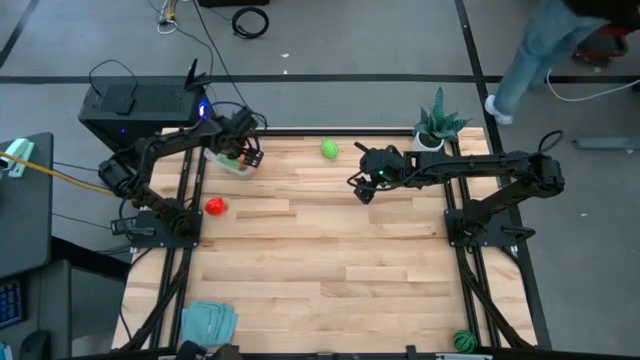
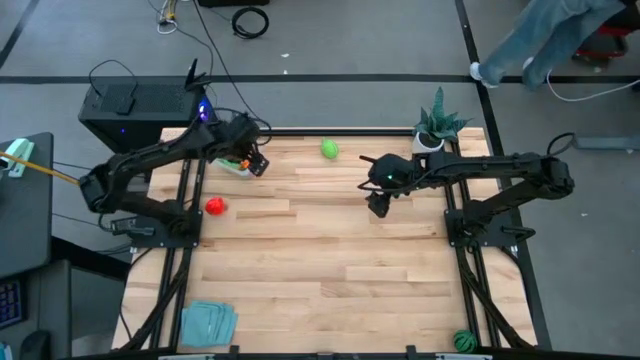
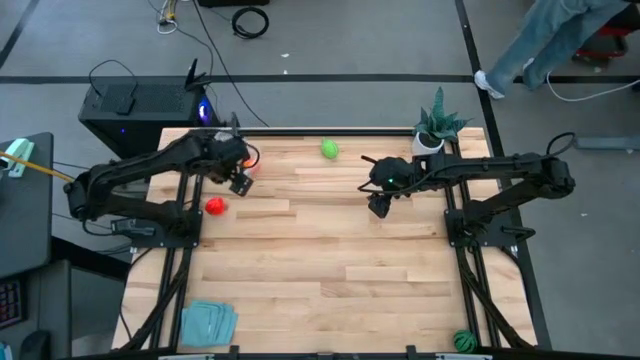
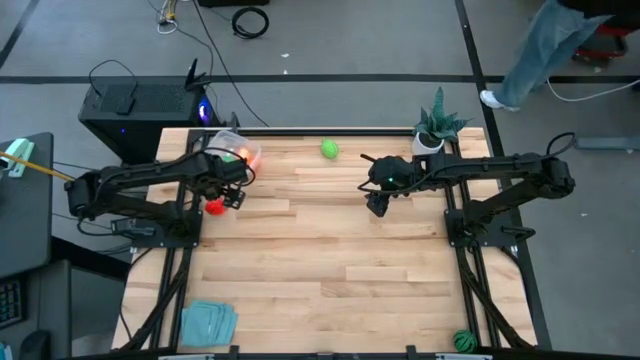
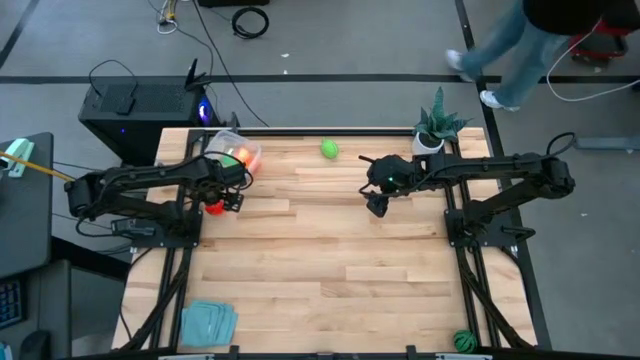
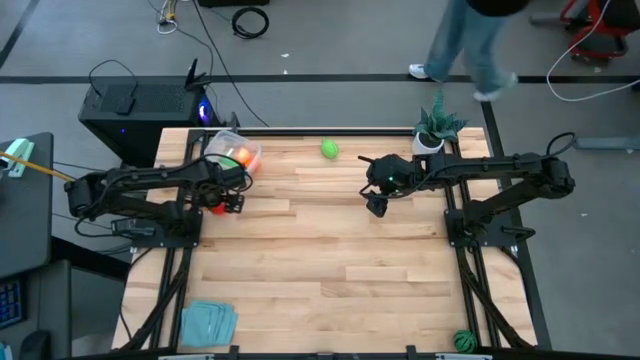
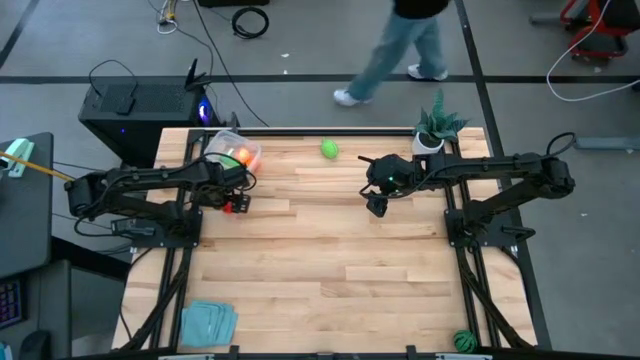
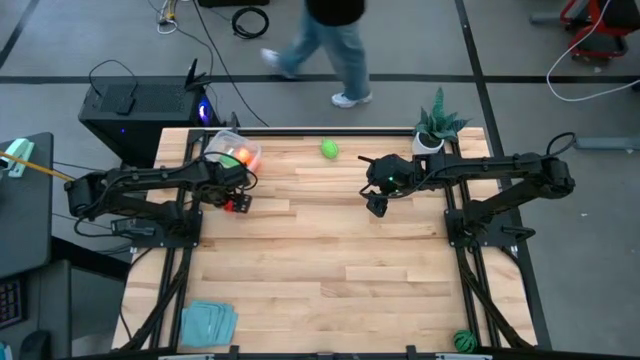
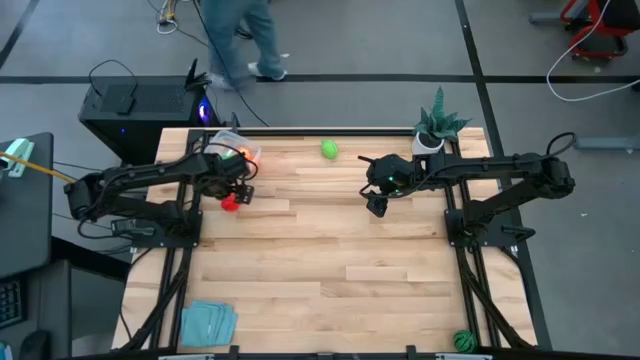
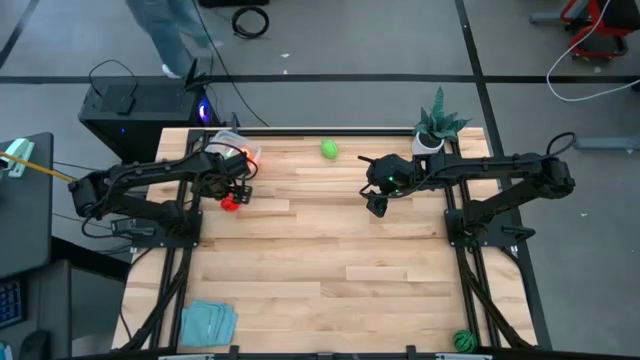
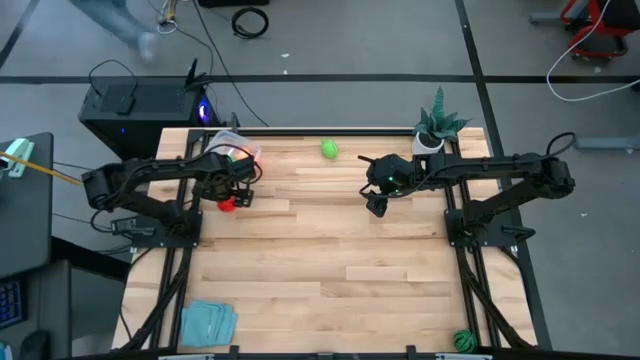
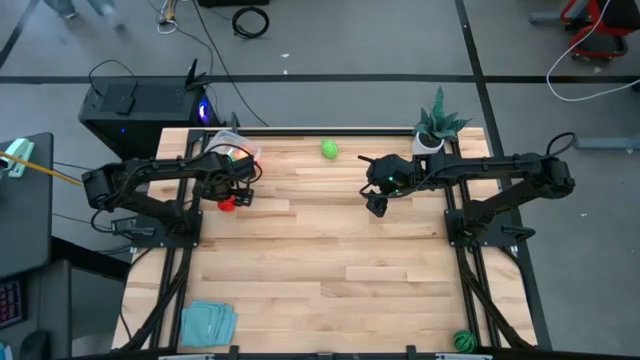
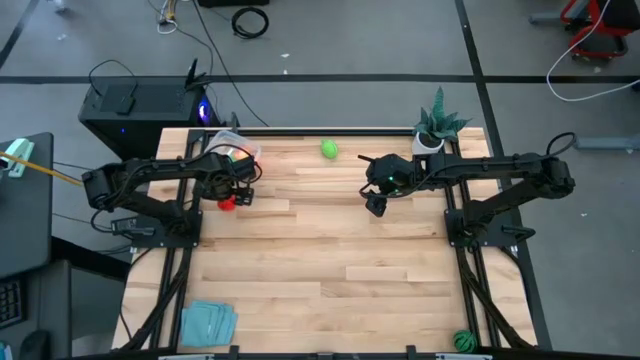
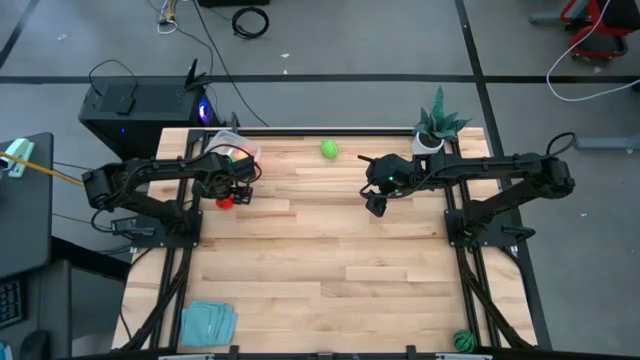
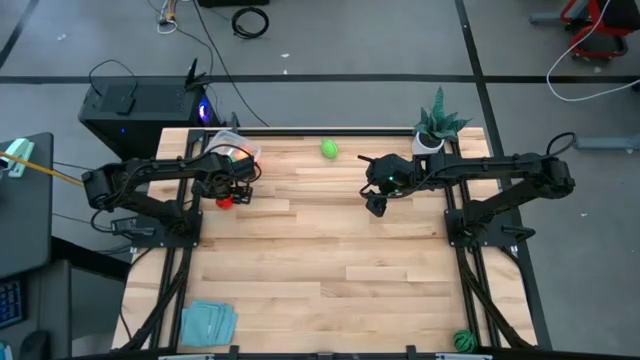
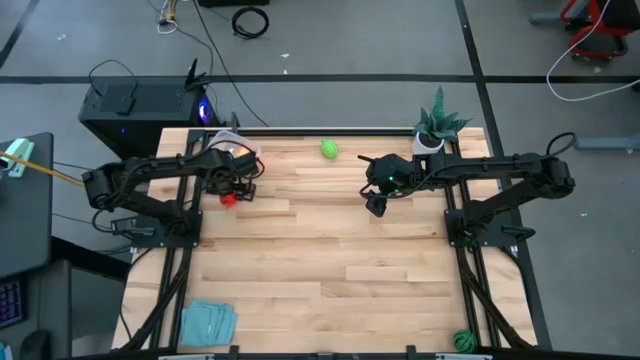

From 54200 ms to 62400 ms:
Task: Pick and placing Produce into tupperware
Put the red apple into the transparent bin

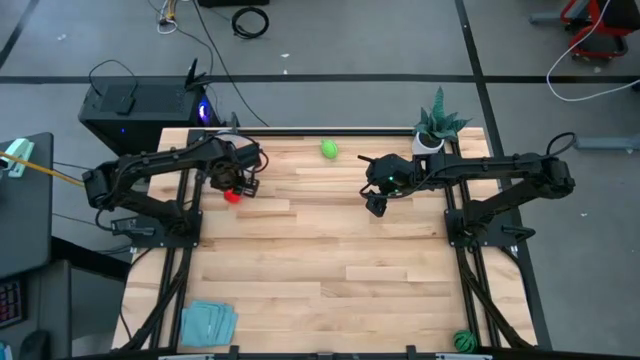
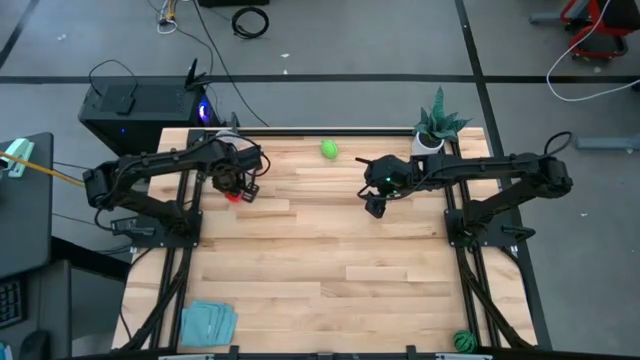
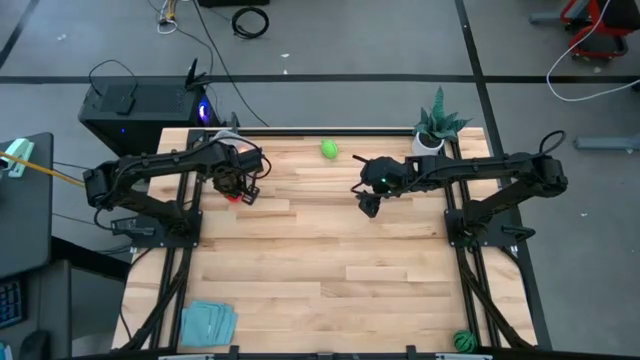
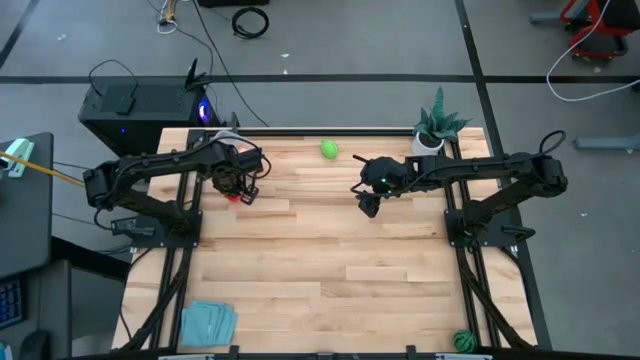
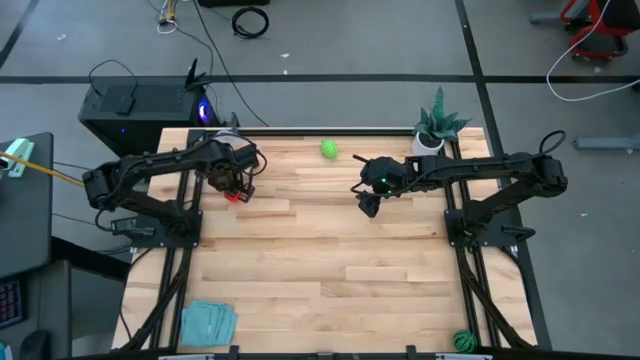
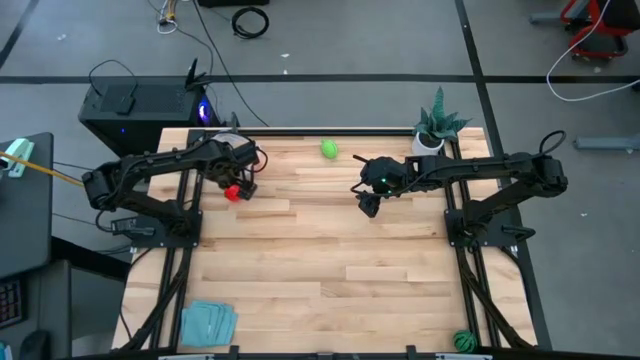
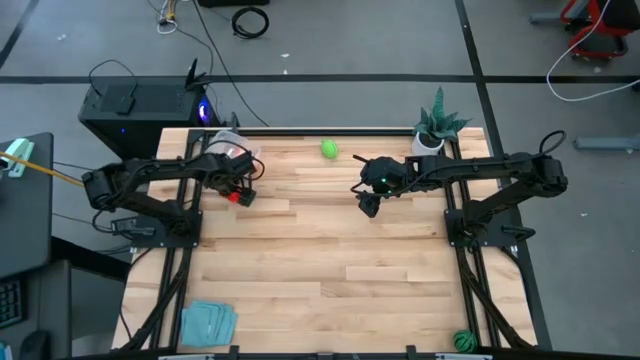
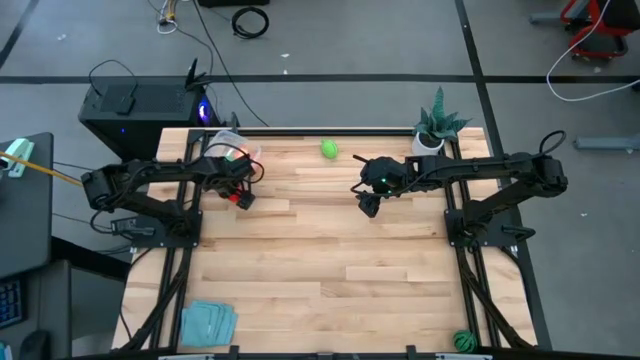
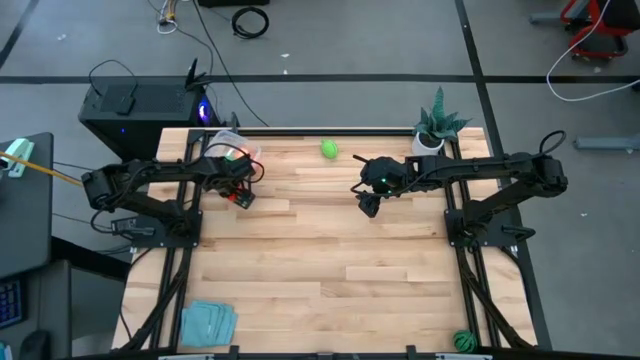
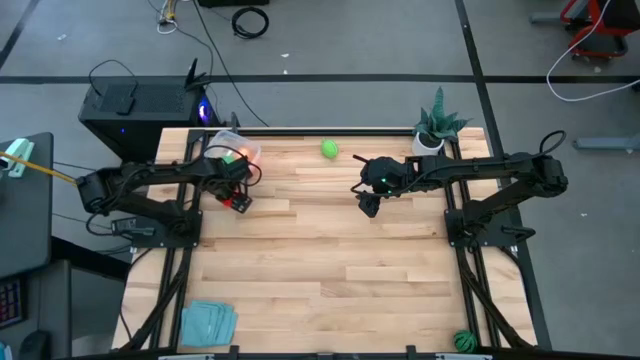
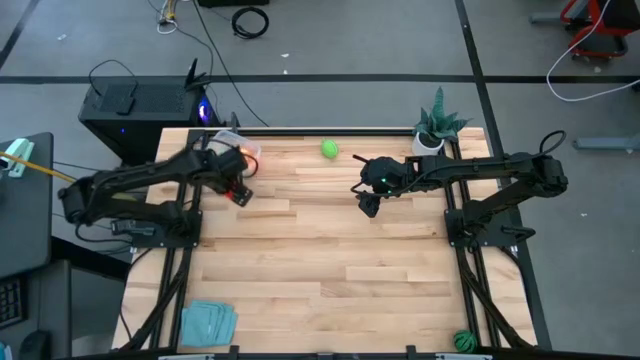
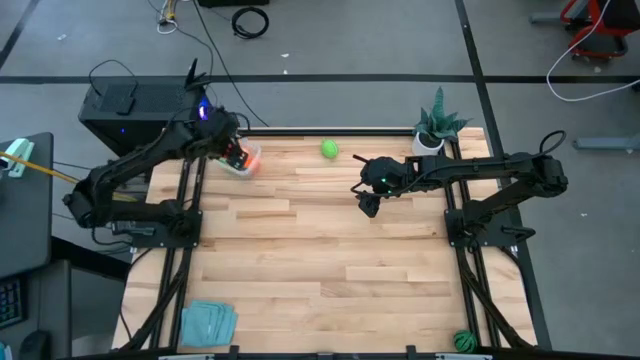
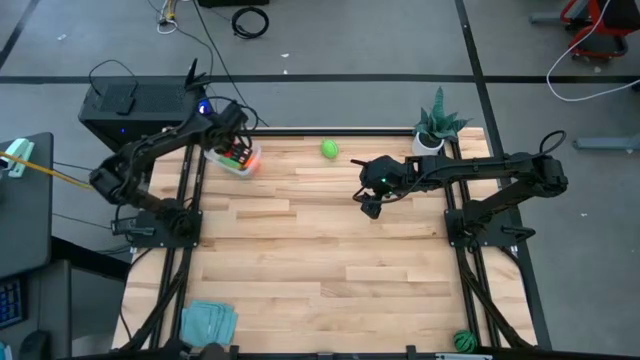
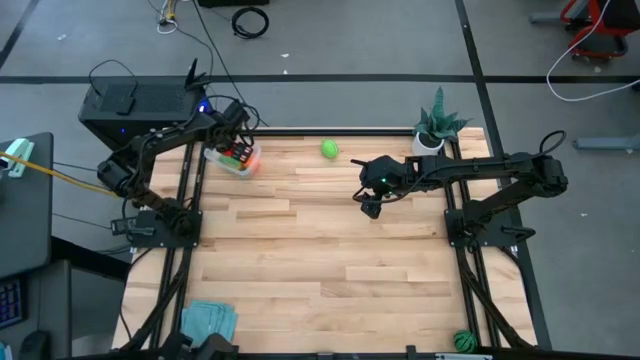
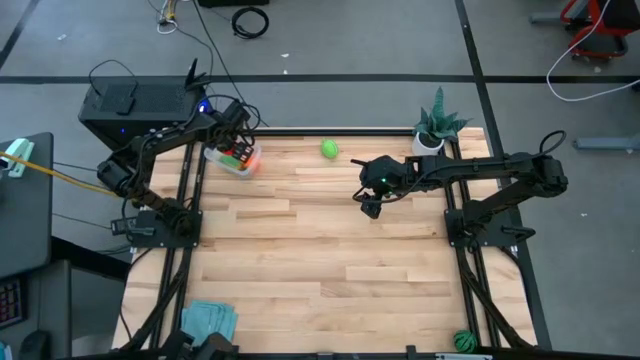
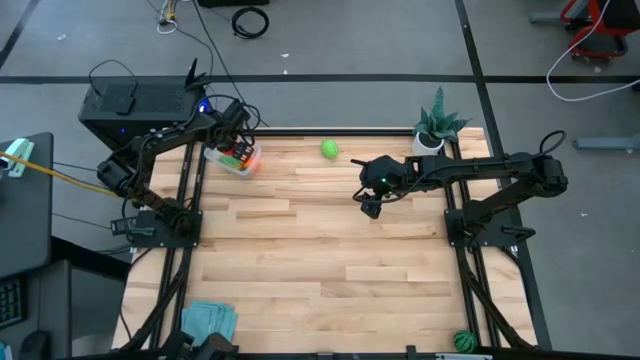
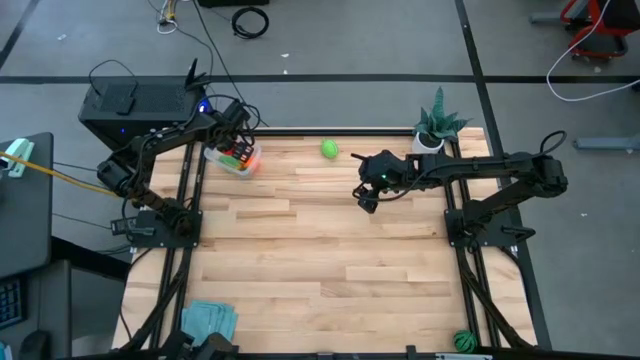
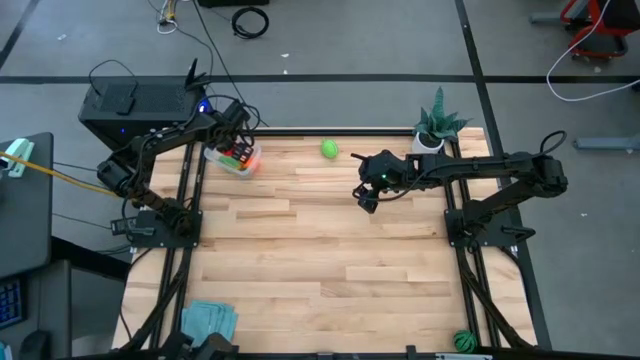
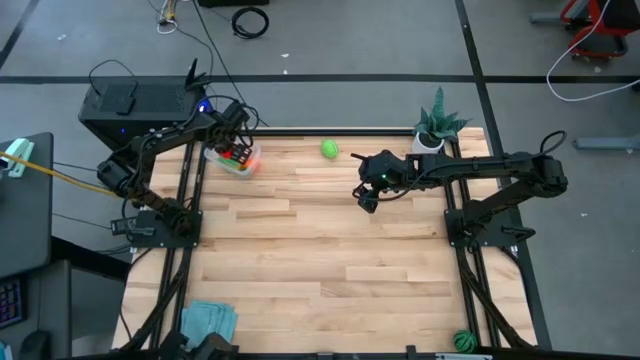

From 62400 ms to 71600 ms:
Put the red apple into the transparent bin

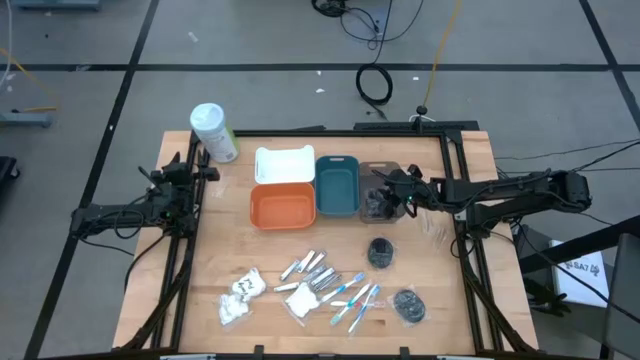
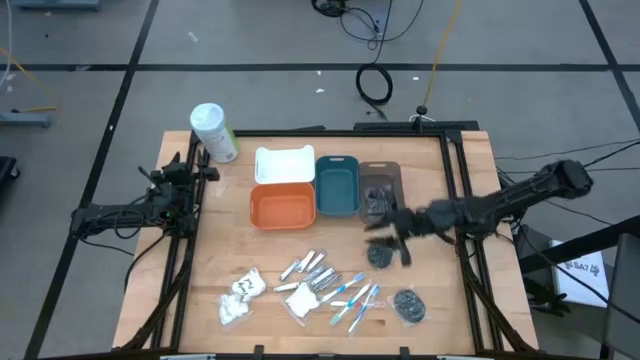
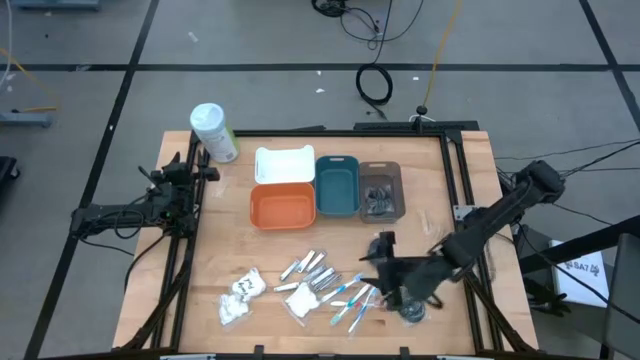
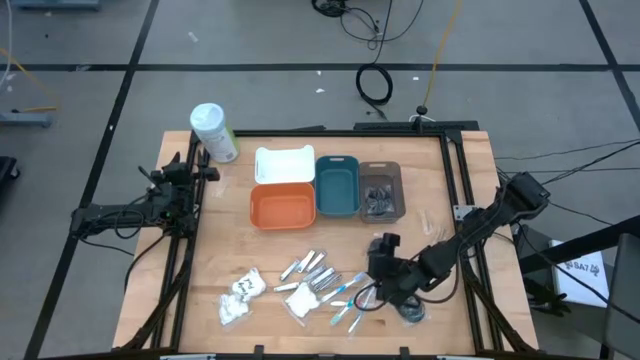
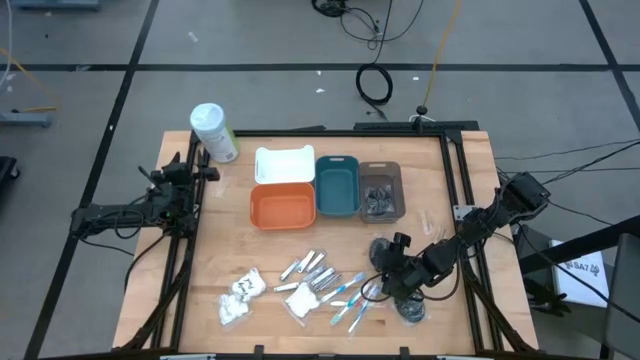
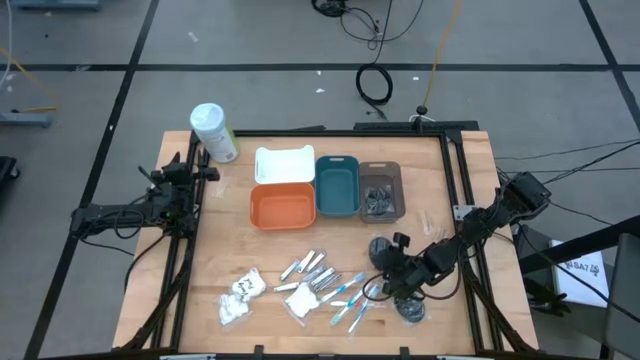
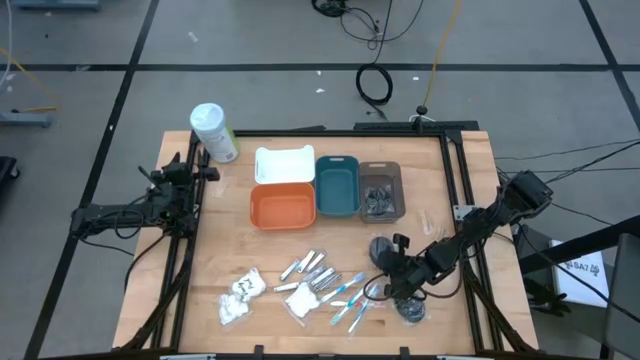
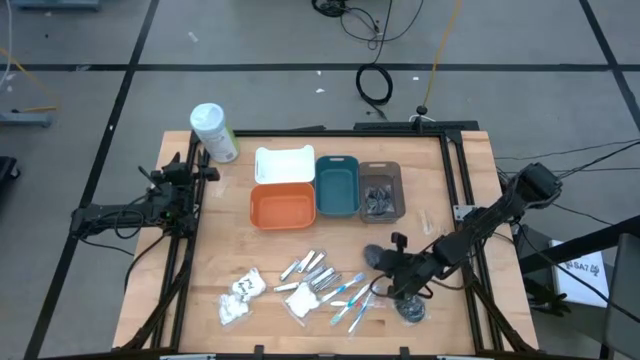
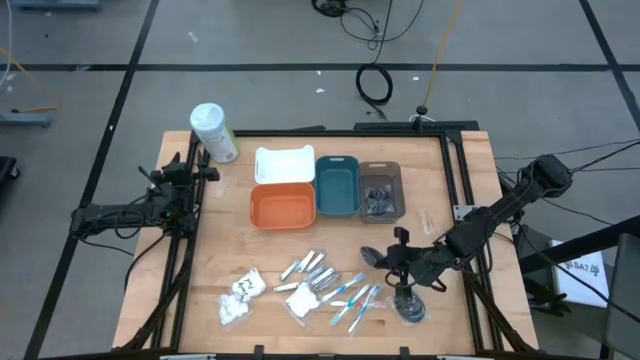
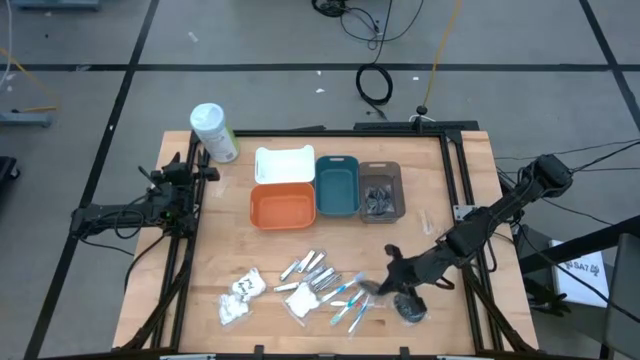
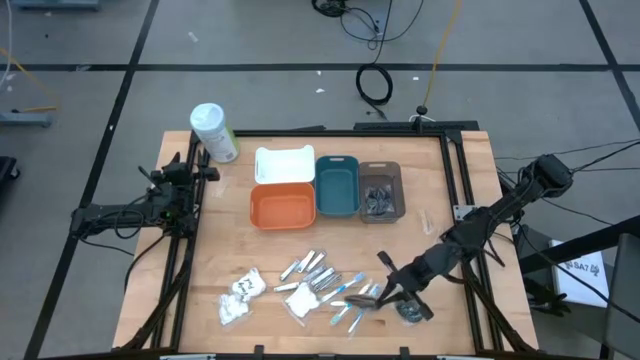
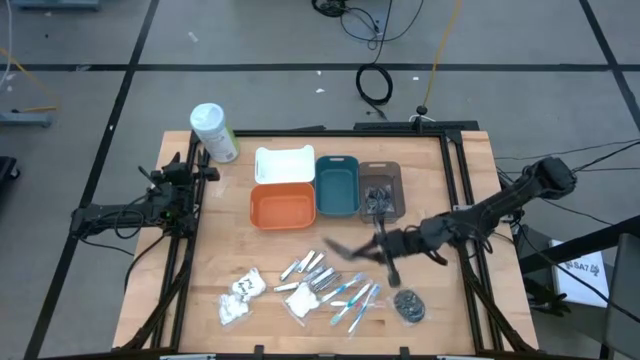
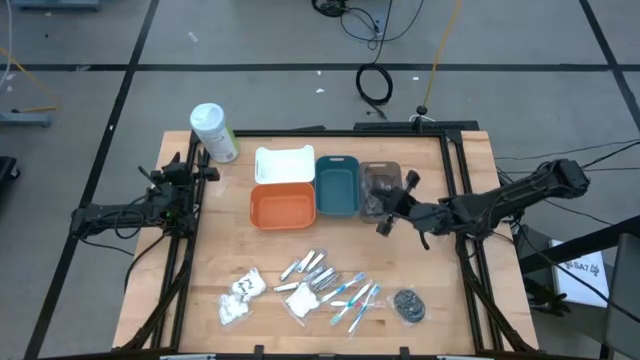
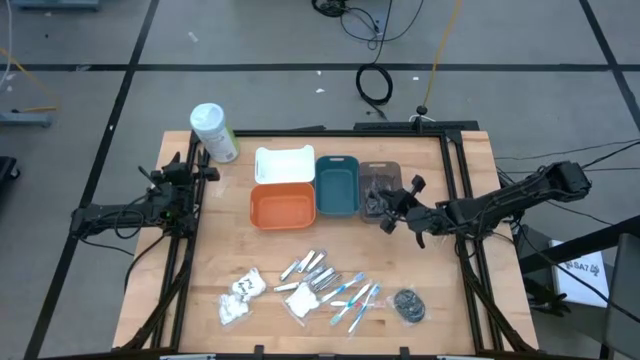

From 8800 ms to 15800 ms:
Task: Pick & Place Travel size toiletries
Put the black hairbrush into the transparent black bin
